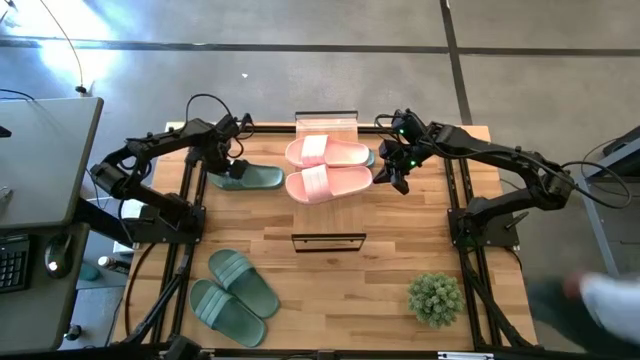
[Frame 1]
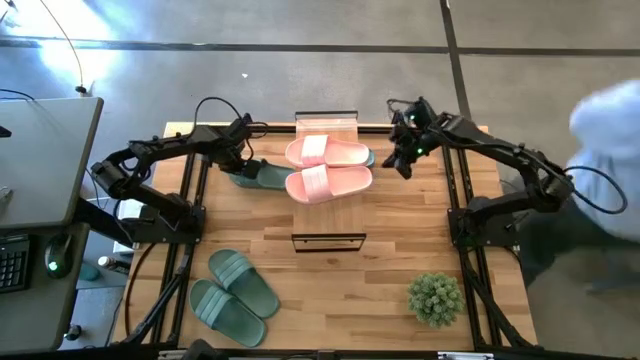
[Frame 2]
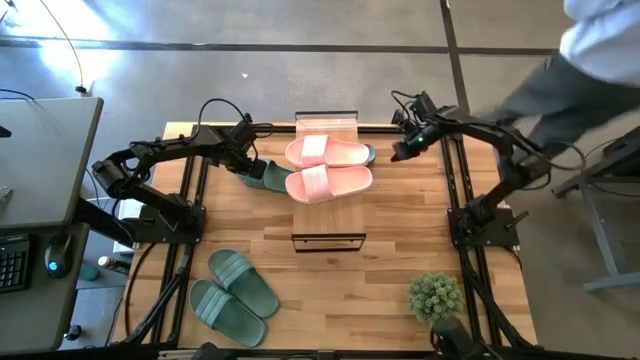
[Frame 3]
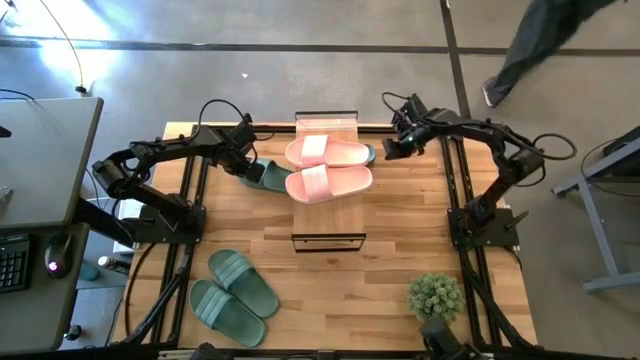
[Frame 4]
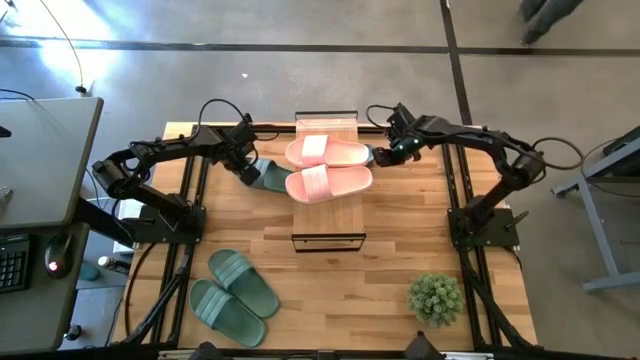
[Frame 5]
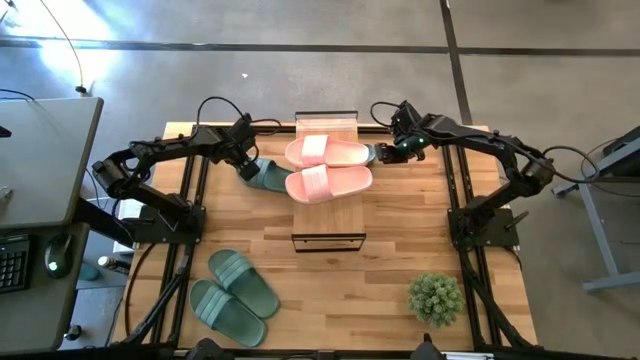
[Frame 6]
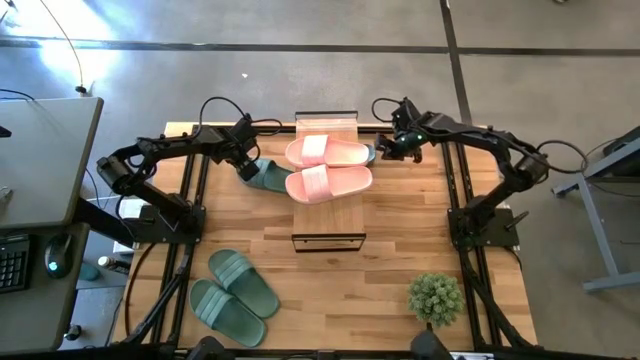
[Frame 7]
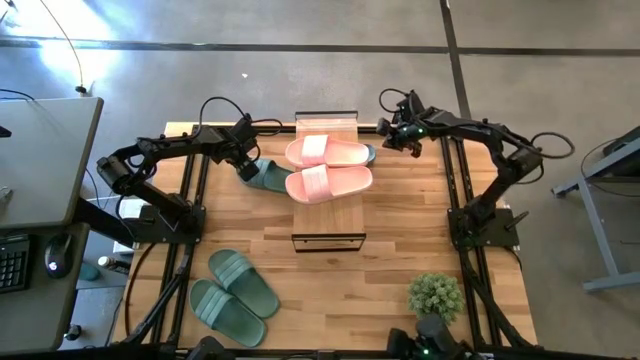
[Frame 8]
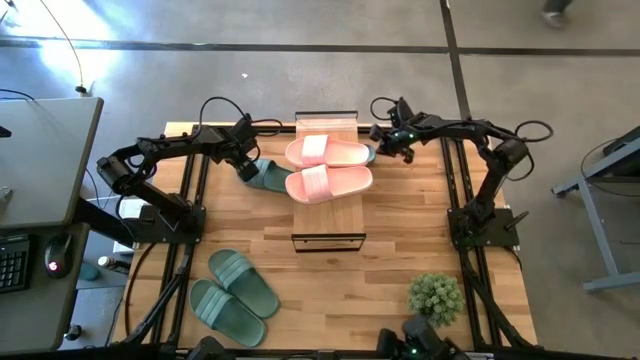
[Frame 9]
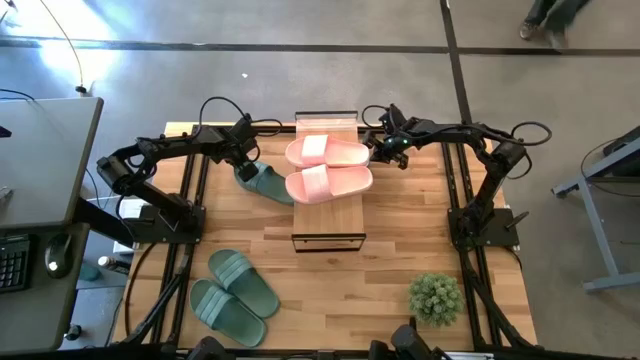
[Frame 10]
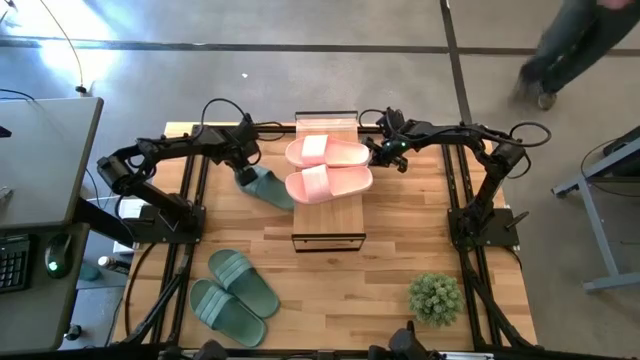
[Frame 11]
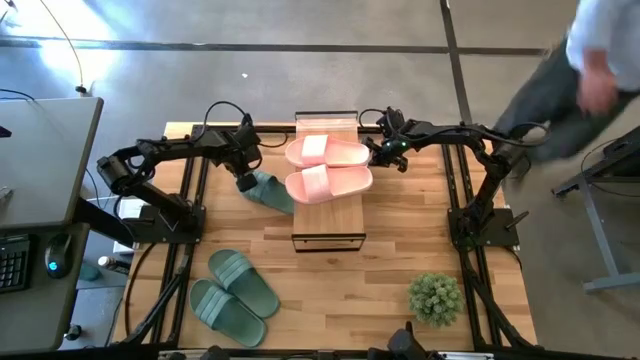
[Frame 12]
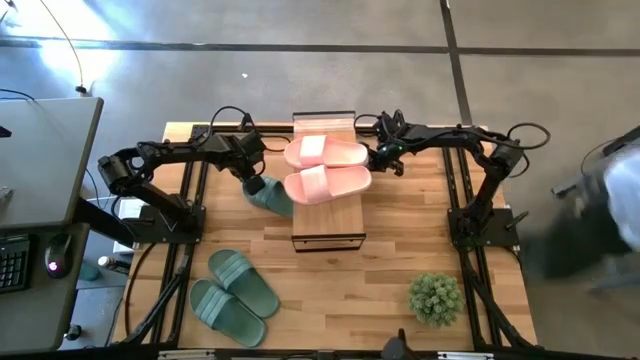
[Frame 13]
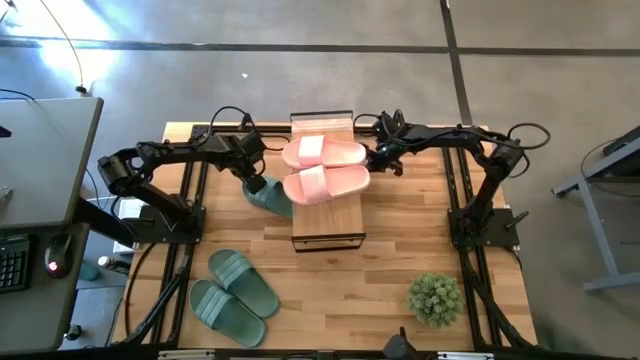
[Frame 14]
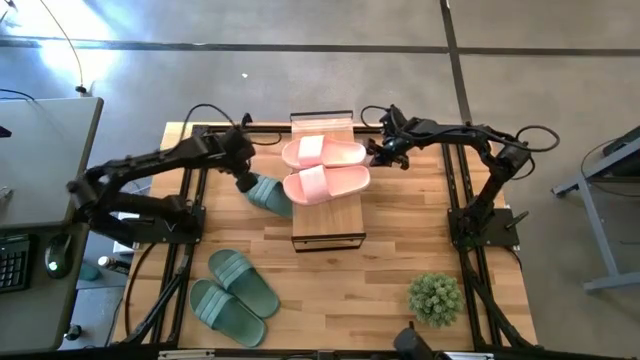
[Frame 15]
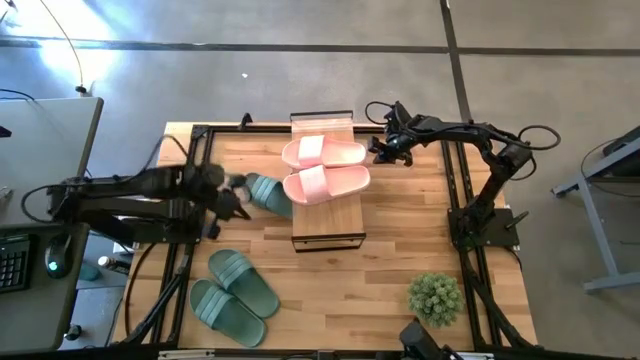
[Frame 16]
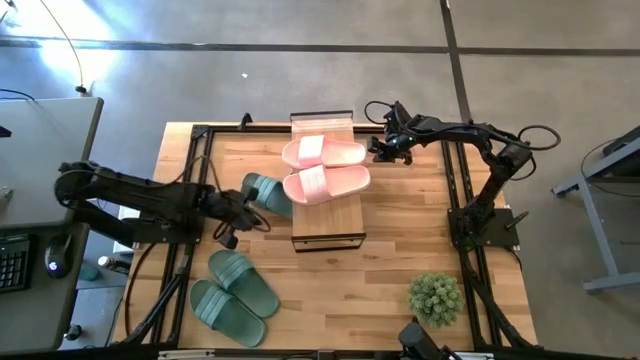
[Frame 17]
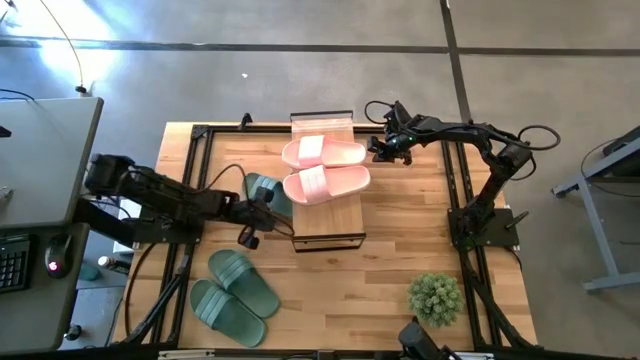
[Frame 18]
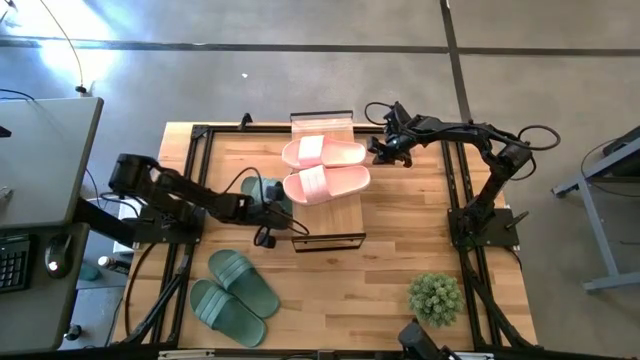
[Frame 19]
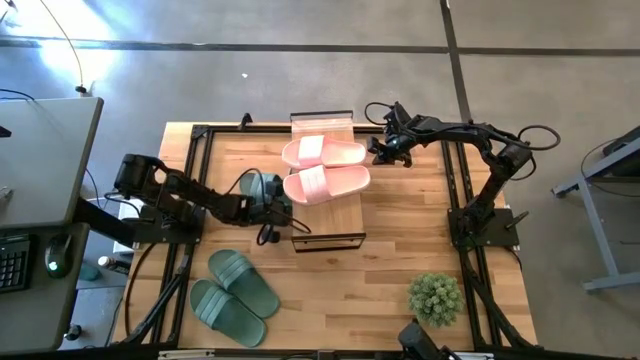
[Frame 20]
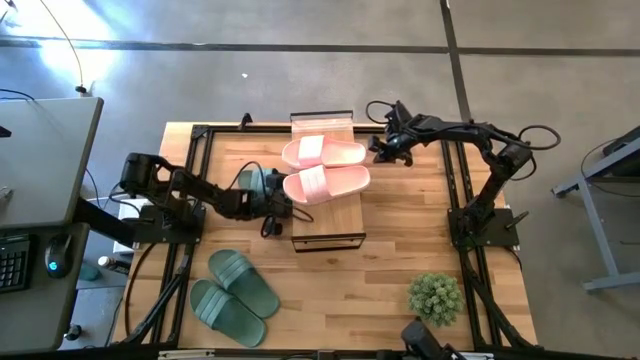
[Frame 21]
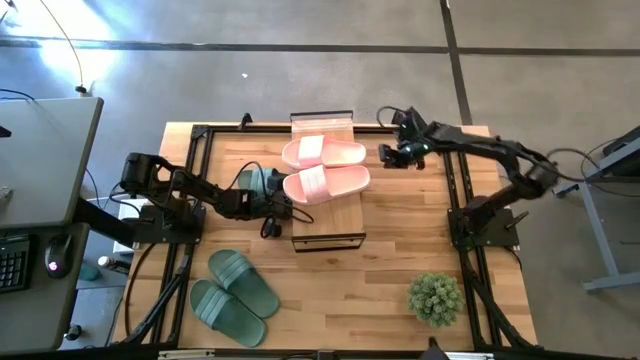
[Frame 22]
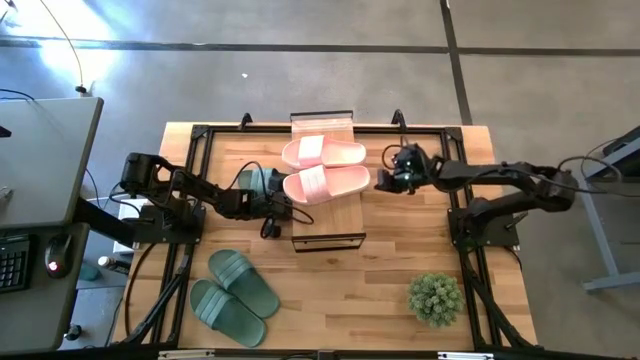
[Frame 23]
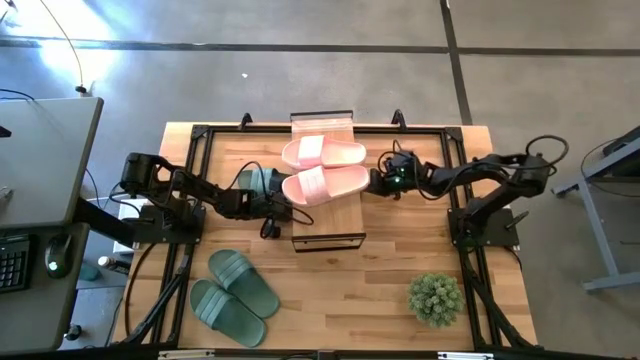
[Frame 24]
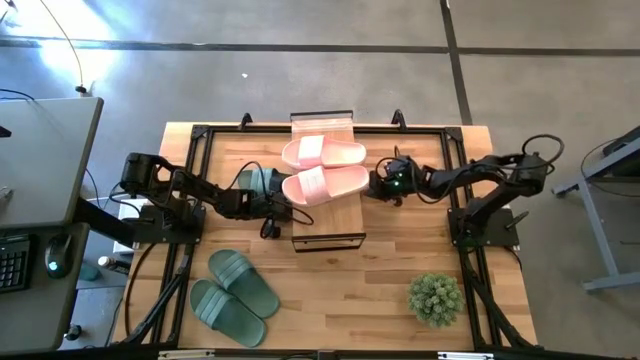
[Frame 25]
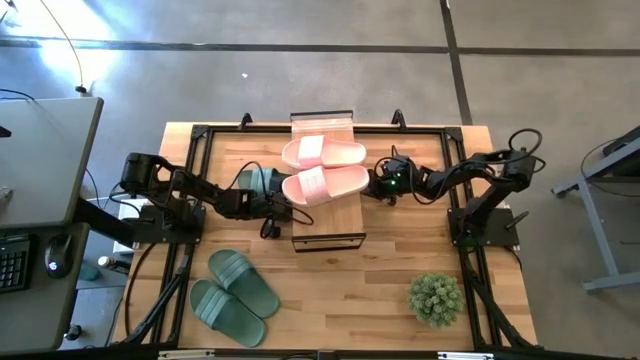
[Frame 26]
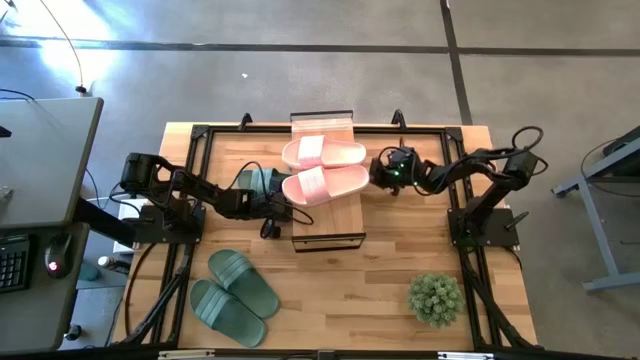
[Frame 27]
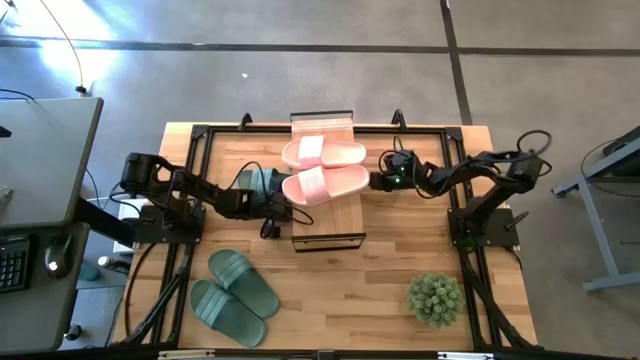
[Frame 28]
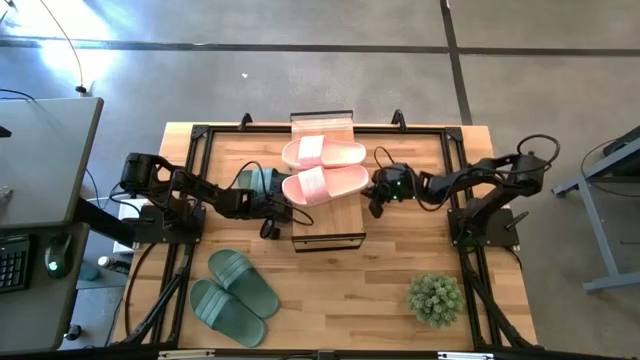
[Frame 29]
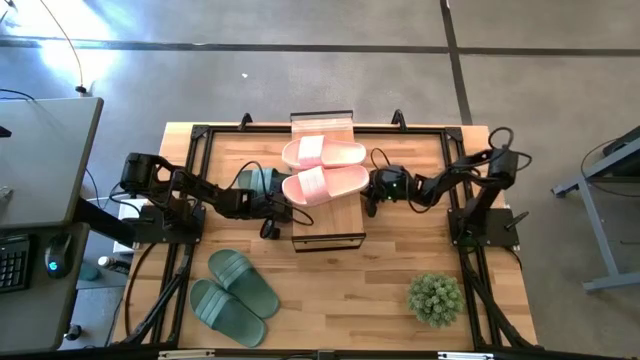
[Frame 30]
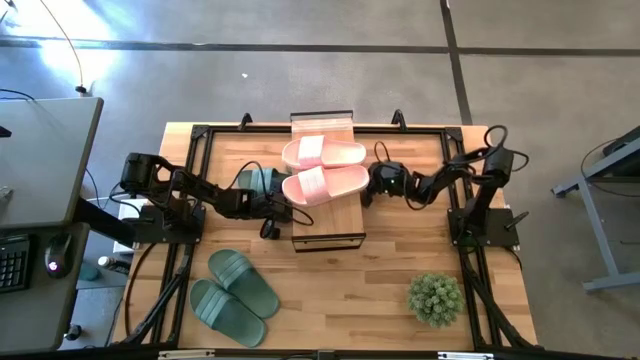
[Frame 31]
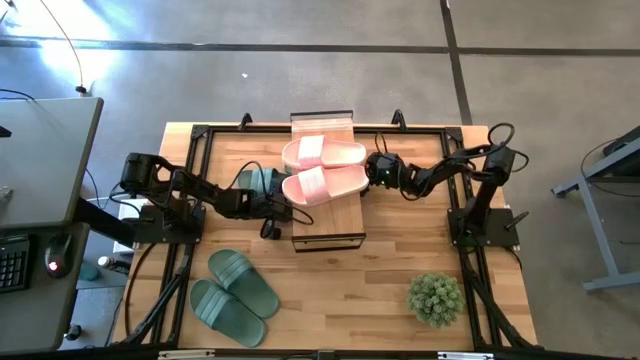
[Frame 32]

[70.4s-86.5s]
Task: Pick and place slides into the shelf
Put the green slide under the shelf

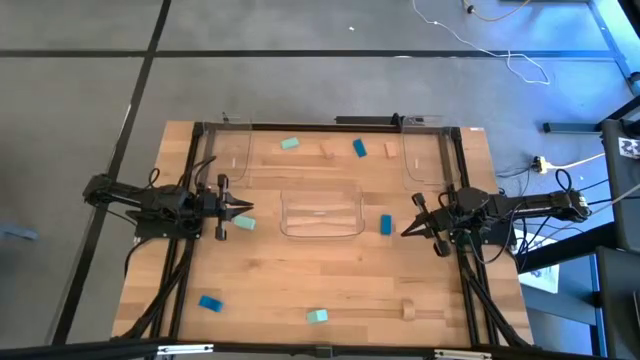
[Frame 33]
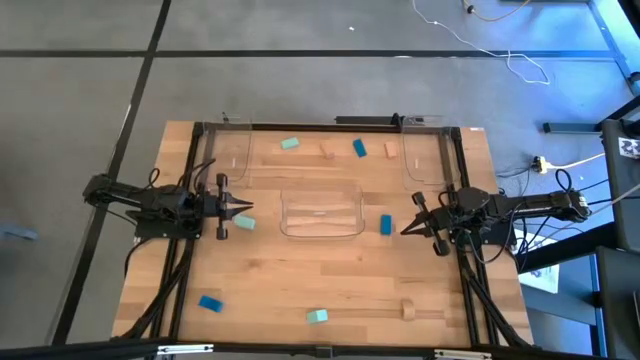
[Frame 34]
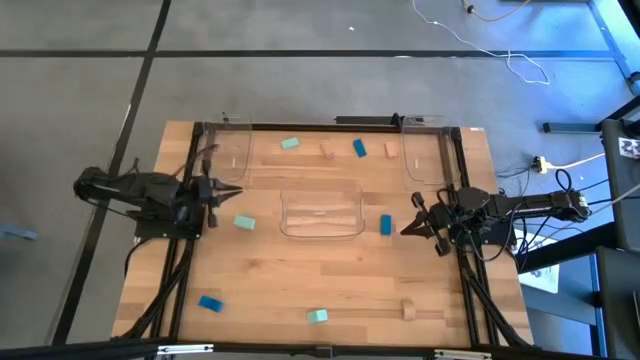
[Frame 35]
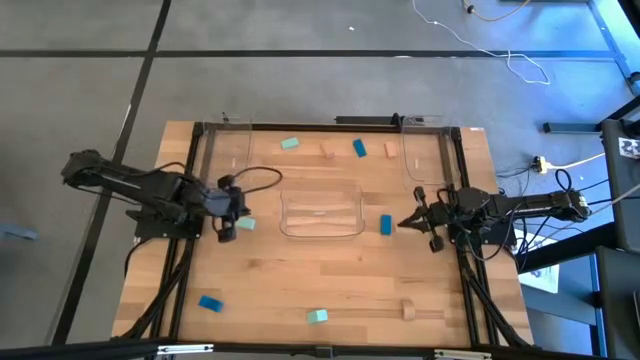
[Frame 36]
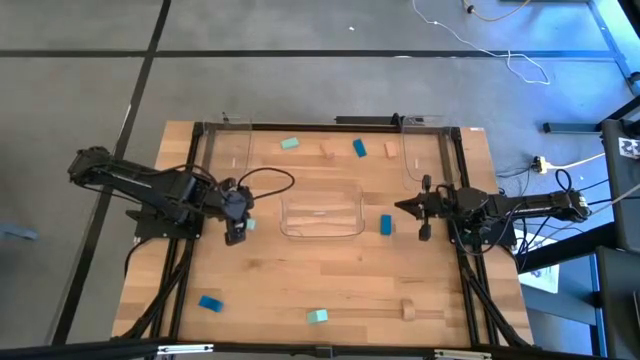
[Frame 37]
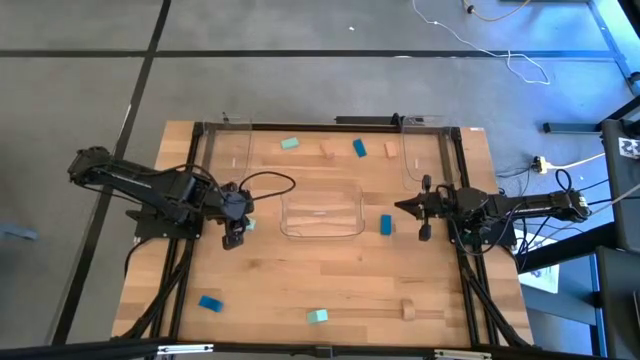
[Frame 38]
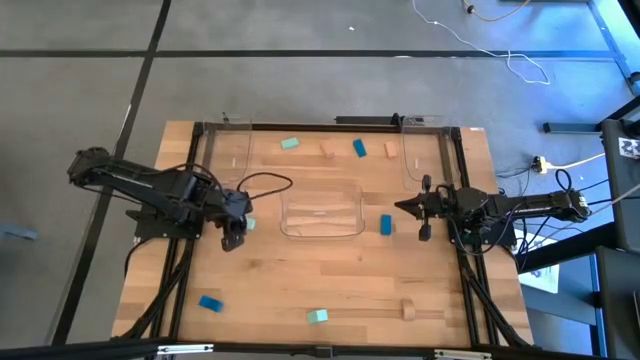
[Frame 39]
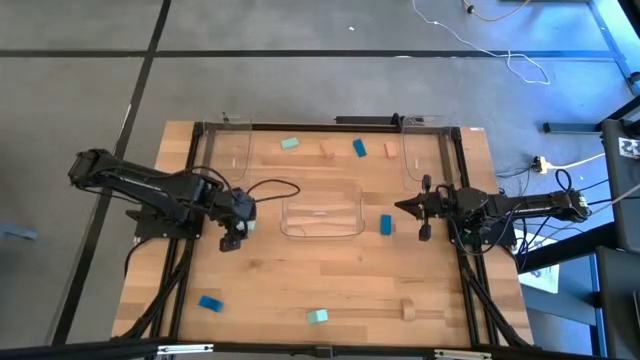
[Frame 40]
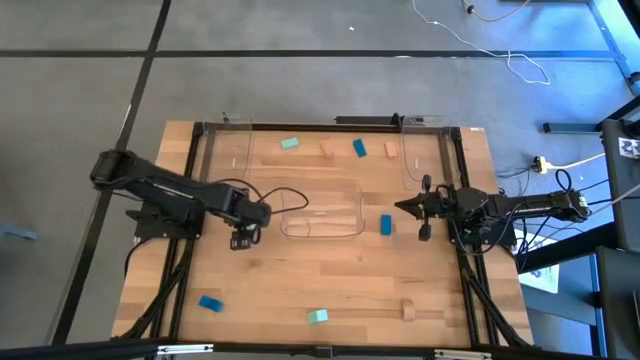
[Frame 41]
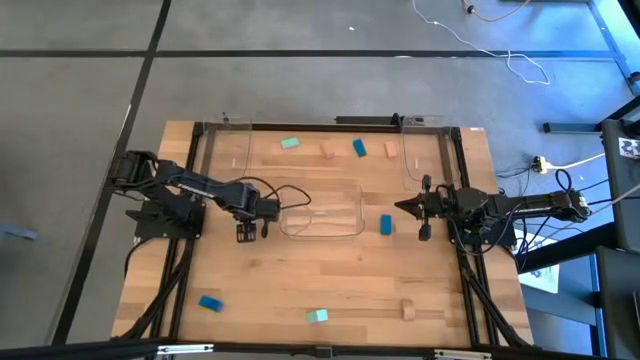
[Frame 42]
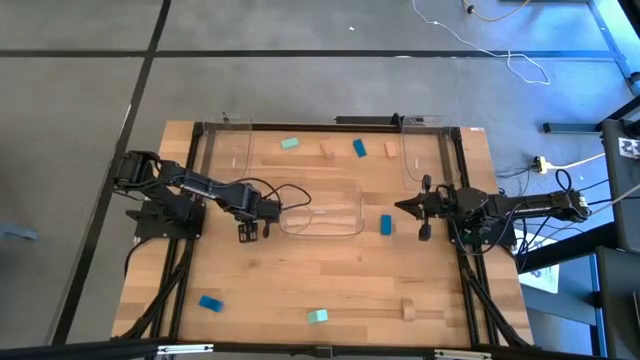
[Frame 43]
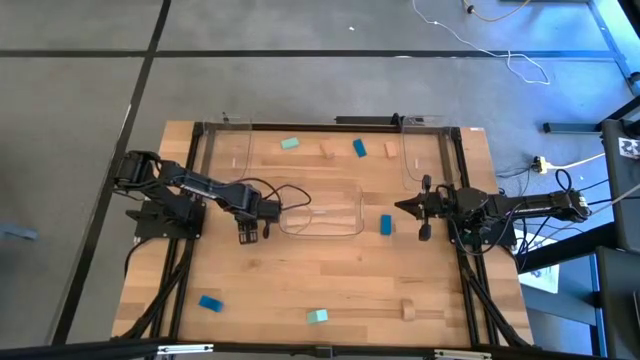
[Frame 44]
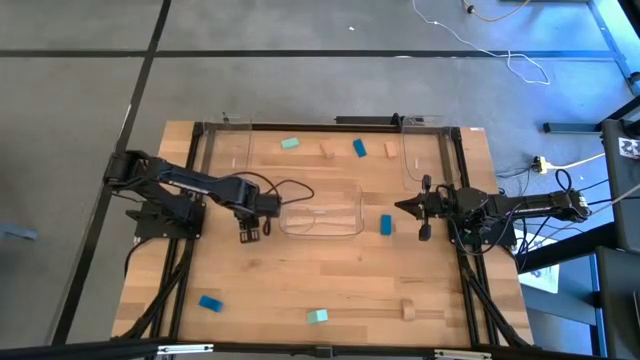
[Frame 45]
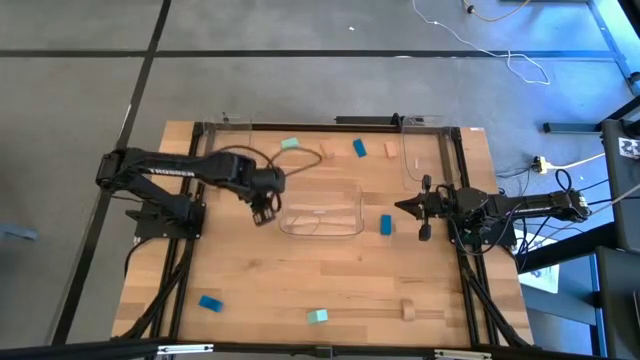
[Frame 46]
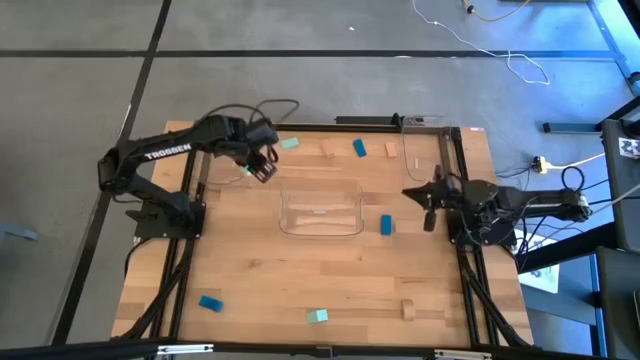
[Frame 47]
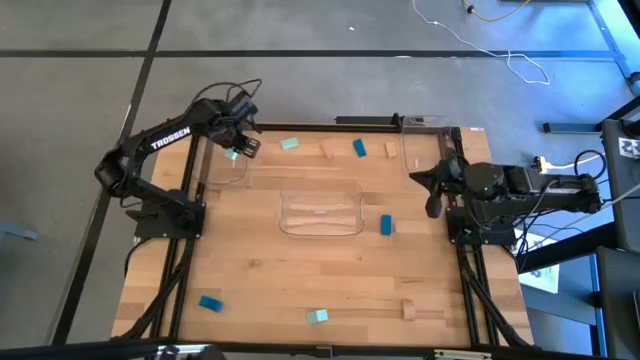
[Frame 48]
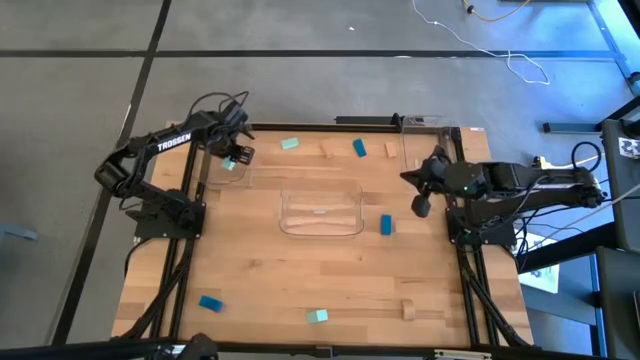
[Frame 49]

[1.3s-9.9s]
Task: Sort & place blocks by color
Put the middle light blue block into the top left transparent bin
